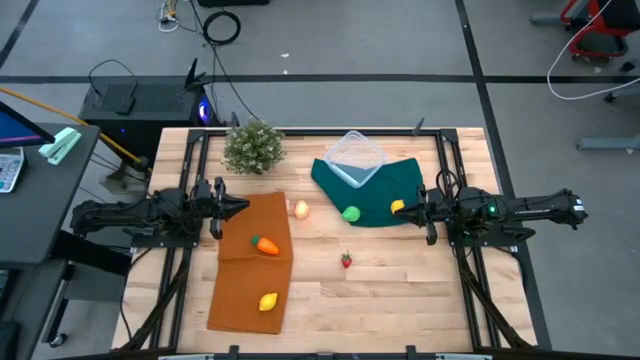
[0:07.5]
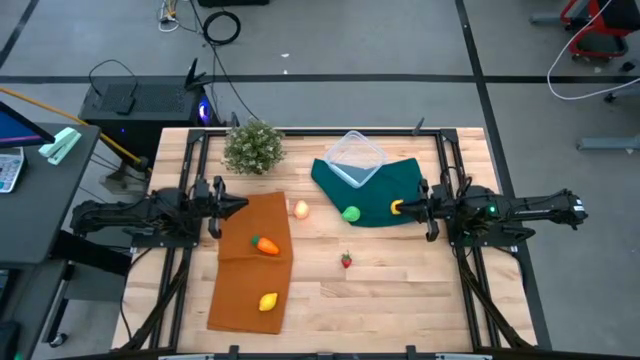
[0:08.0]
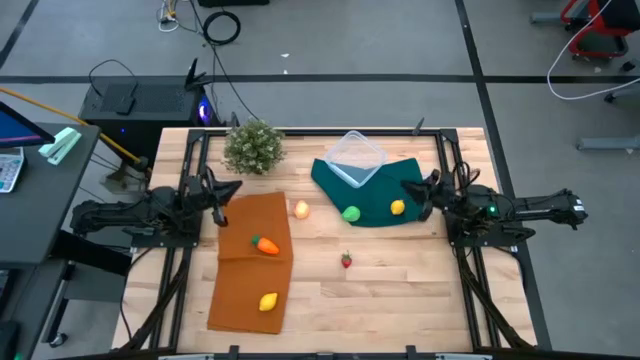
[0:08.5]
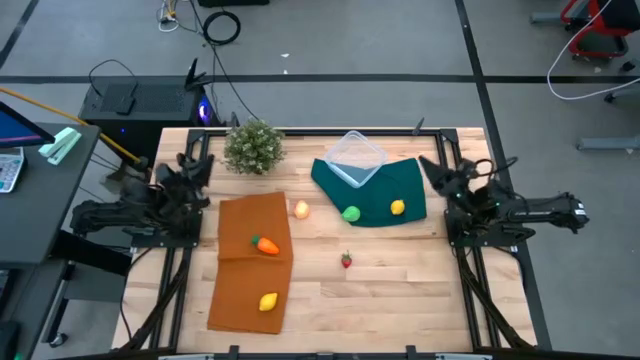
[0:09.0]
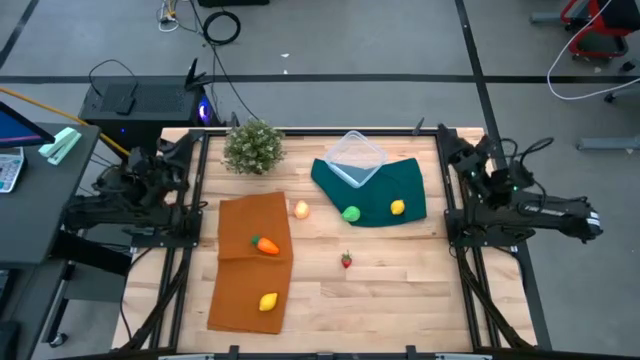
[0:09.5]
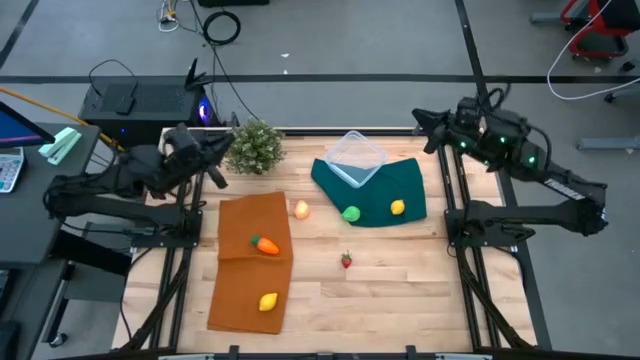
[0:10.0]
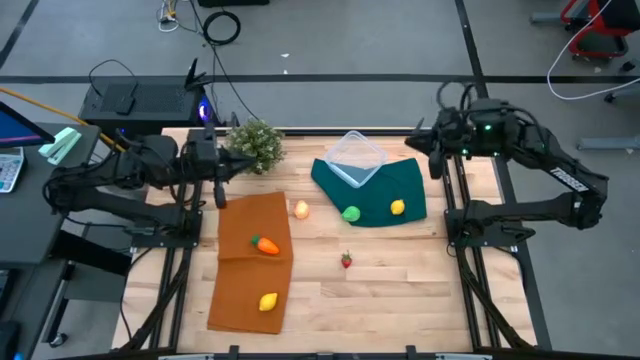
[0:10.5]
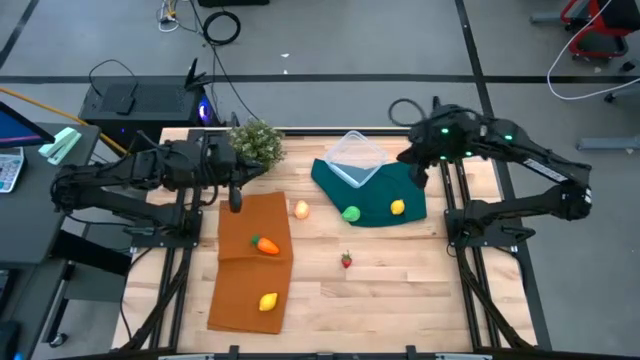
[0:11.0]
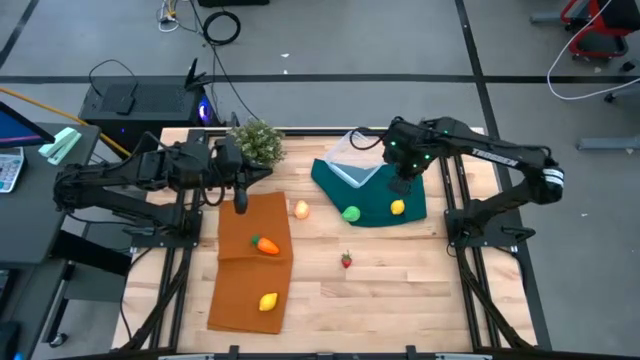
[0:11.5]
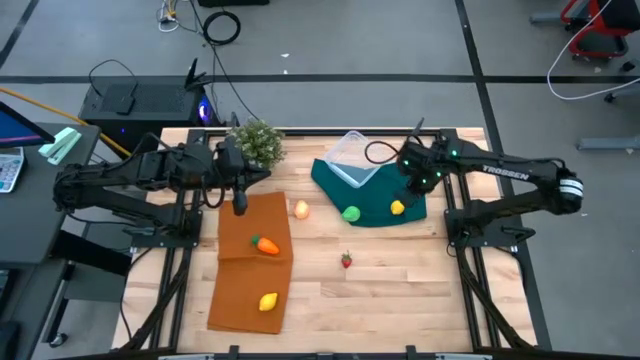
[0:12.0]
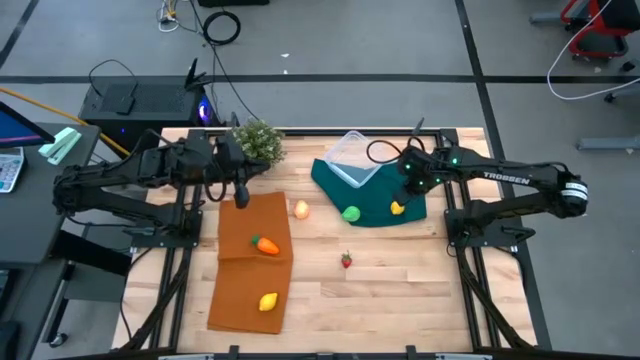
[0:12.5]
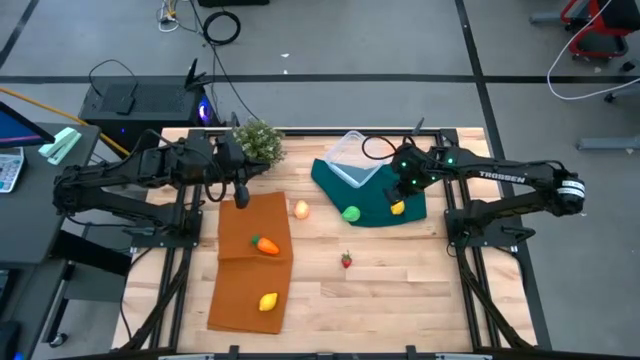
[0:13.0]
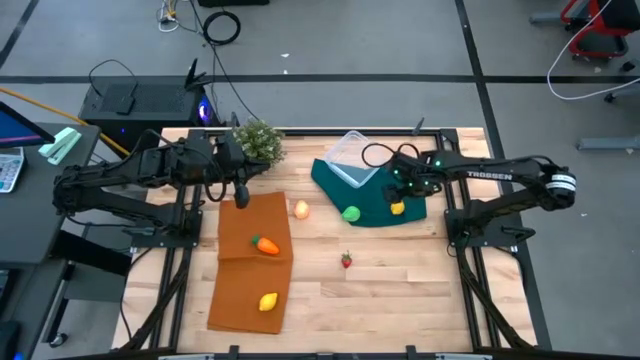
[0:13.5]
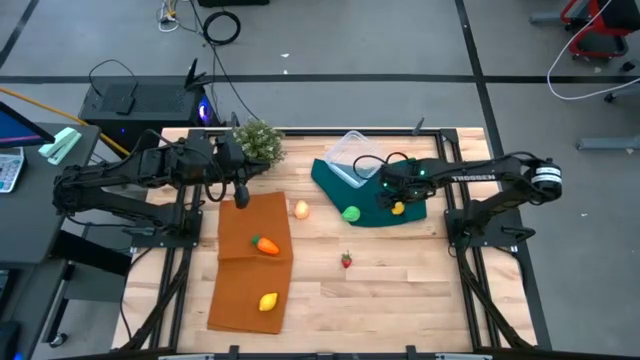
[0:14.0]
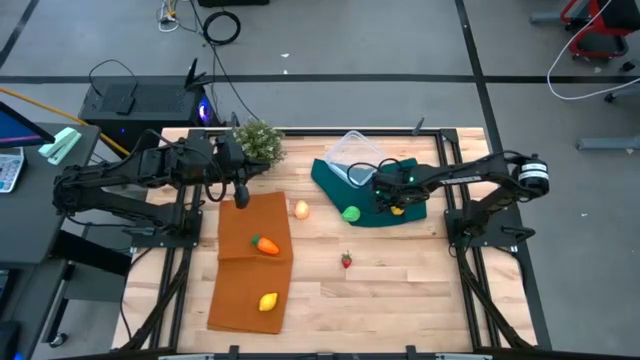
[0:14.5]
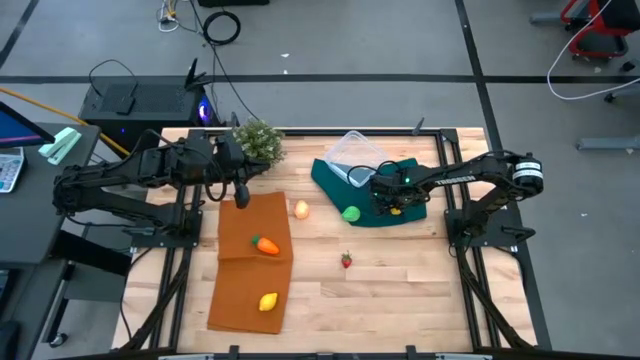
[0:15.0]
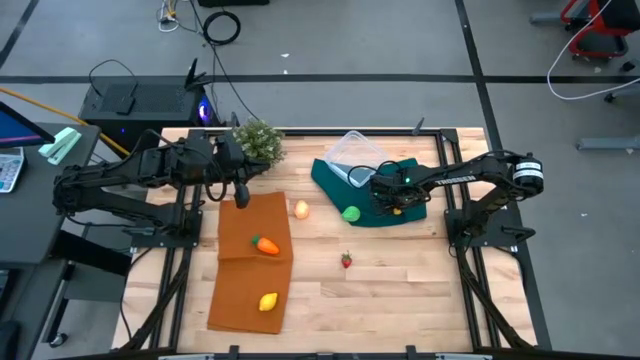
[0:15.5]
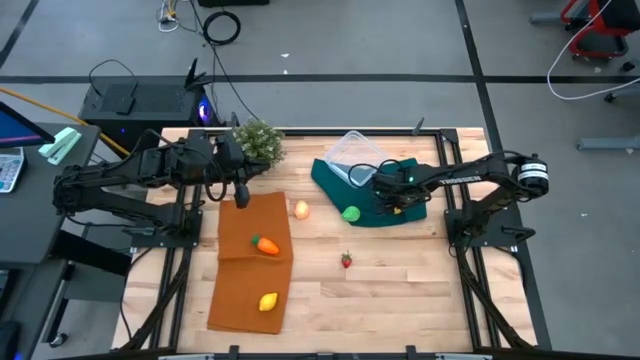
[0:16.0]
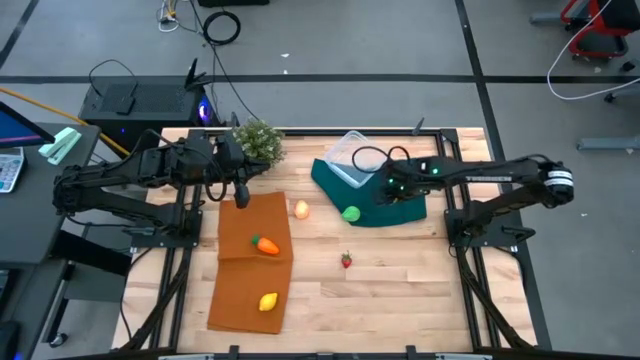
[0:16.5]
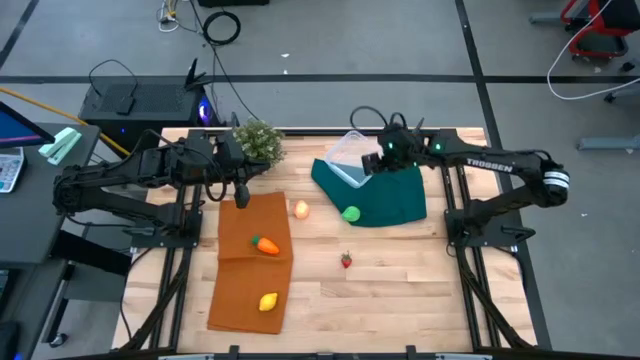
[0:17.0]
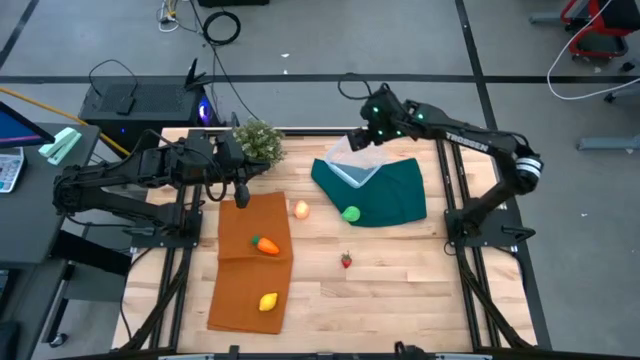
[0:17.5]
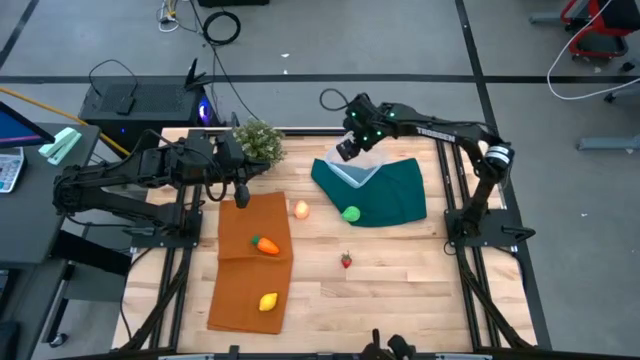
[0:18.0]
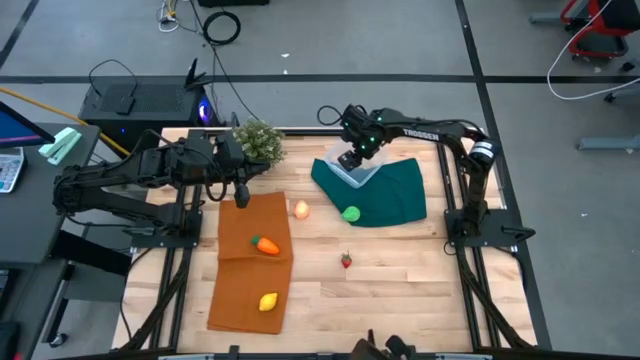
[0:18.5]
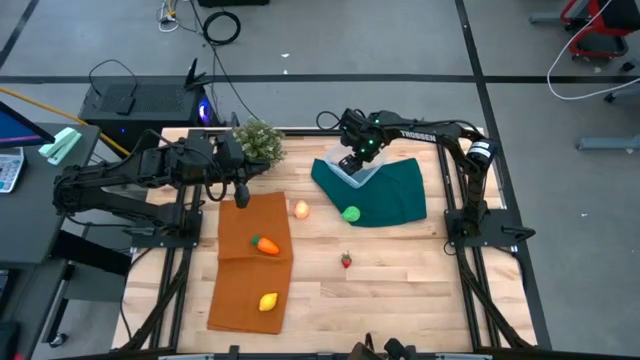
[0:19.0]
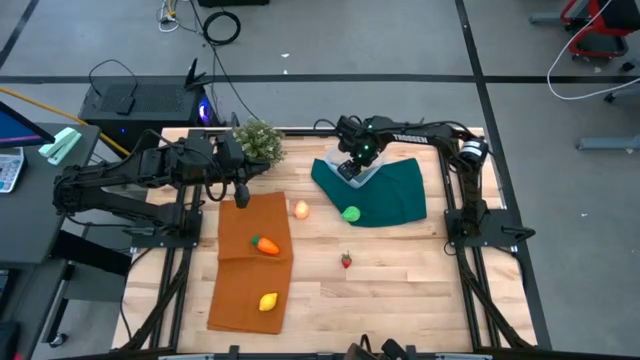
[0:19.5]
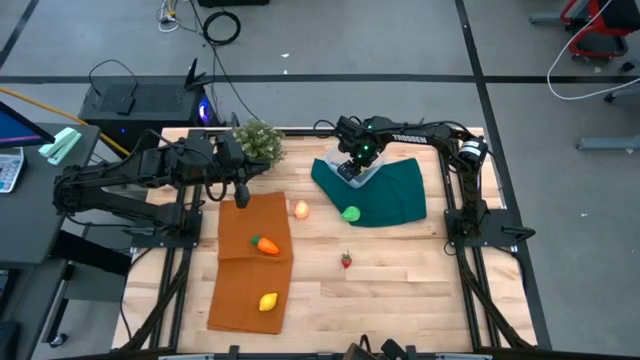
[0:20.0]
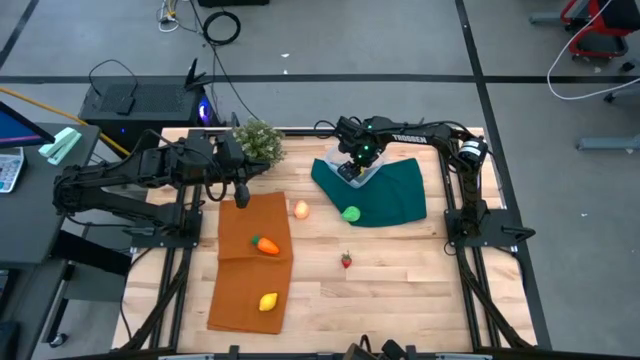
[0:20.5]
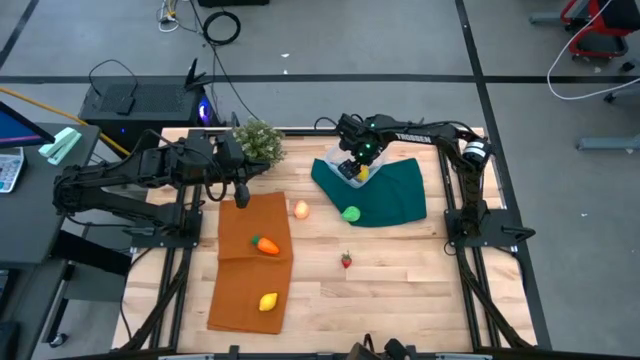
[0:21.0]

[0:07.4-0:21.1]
Task: Pick and placing Produce into tupperware
Put the lemon into the transparent bin

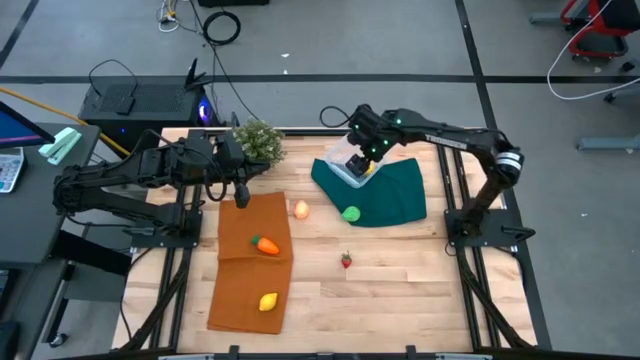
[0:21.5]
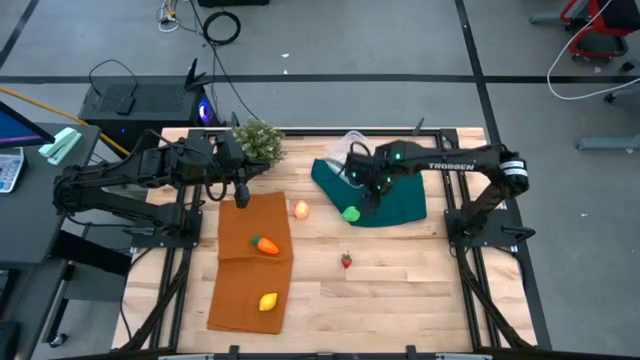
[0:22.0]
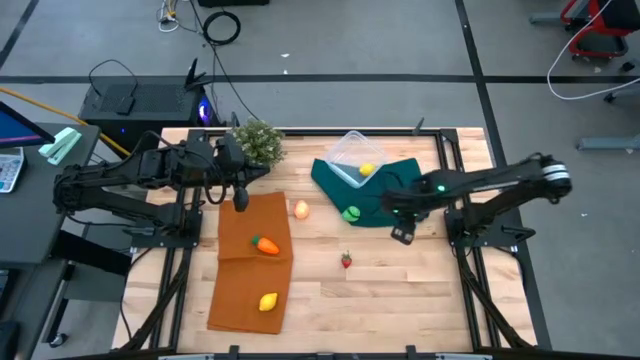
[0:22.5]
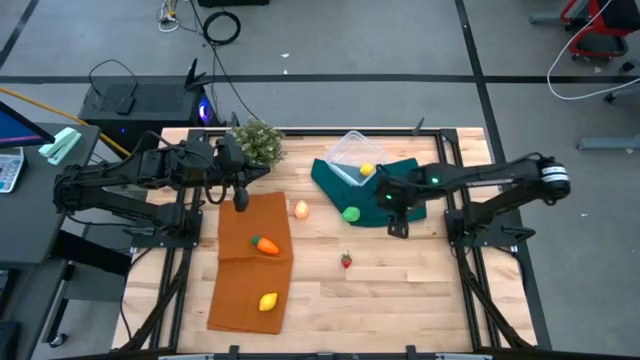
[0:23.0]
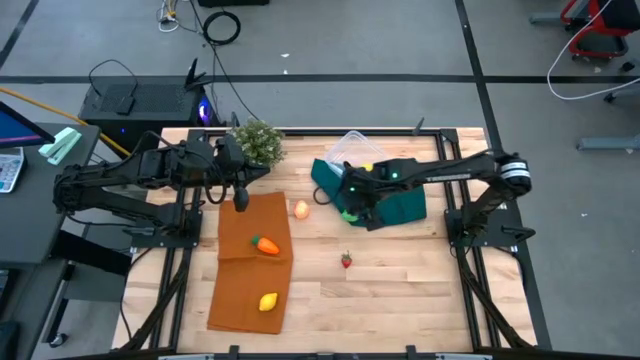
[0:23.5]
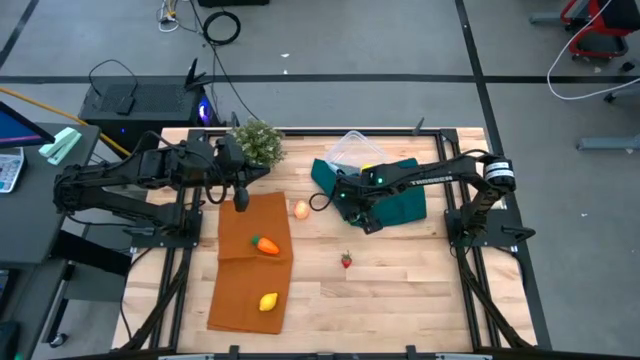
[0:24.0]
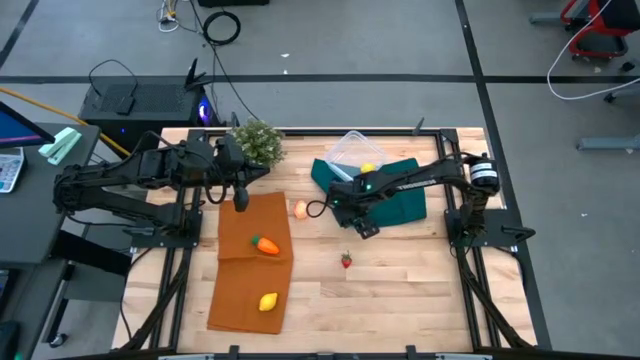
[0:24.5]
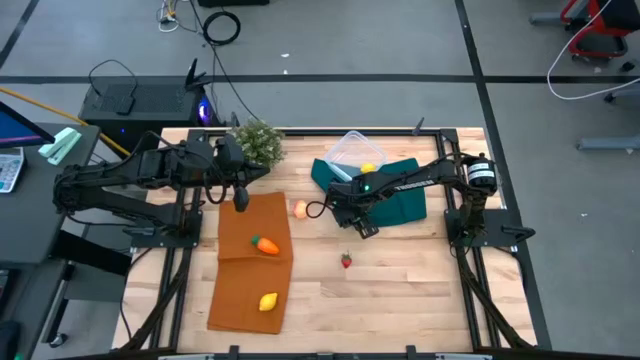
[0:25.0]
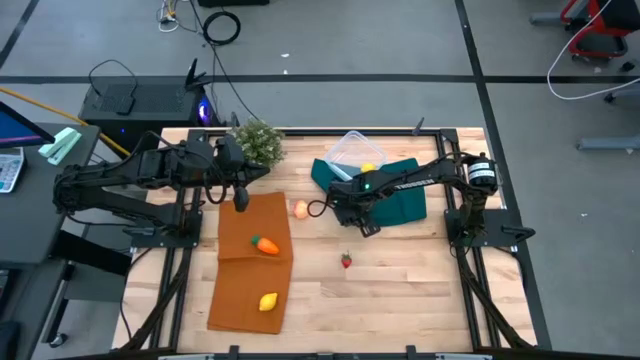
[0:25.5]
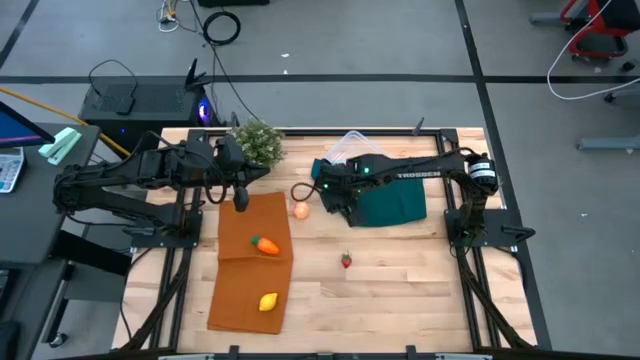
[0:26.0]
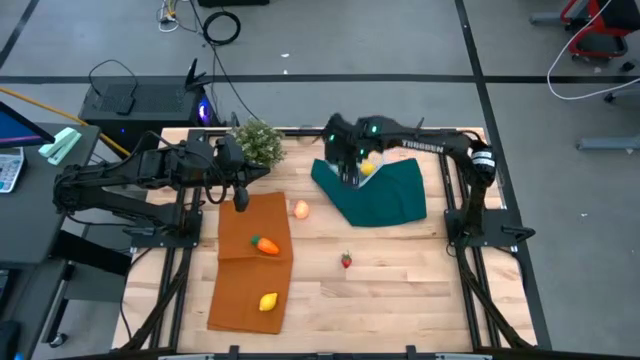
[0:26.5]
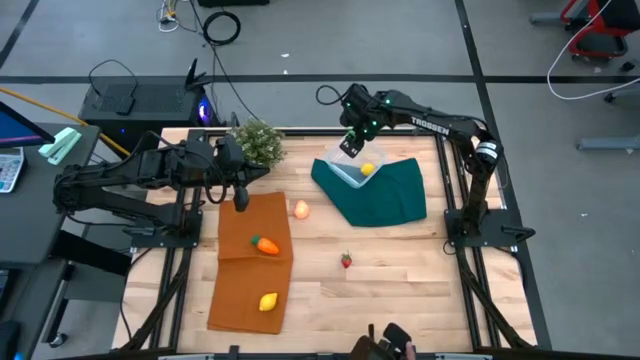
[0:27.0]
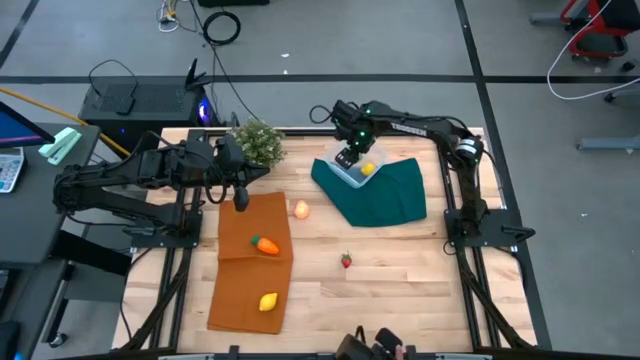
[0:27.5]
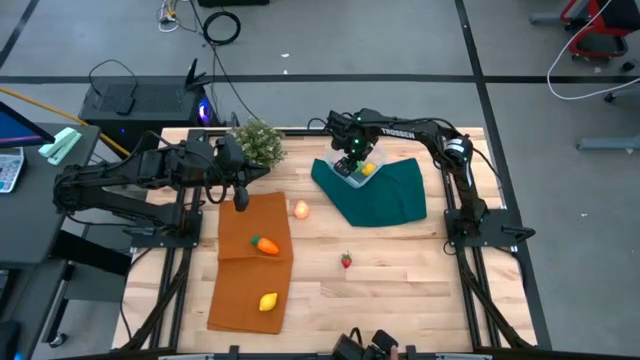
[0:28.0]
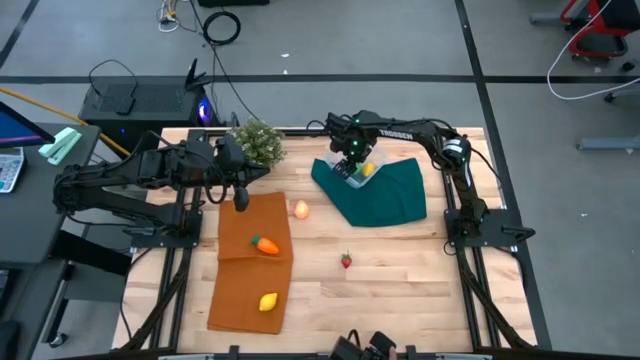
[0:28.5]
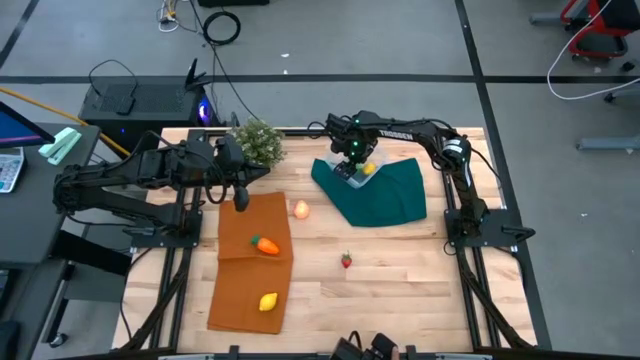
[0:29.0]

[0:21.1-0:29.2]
Put the pear into the transparent bin
